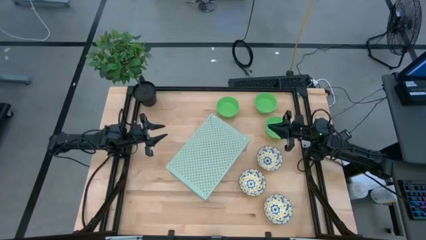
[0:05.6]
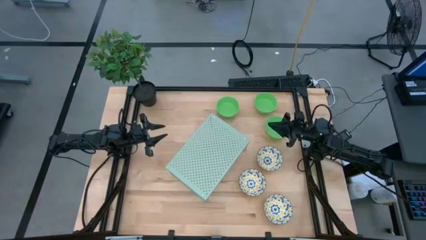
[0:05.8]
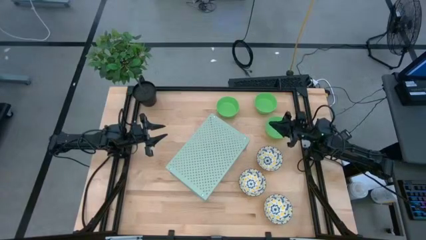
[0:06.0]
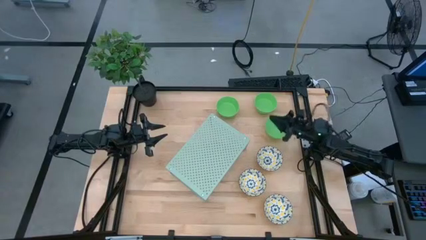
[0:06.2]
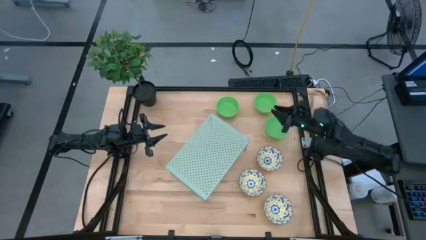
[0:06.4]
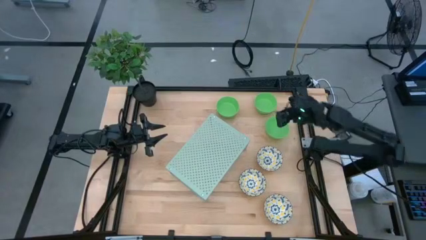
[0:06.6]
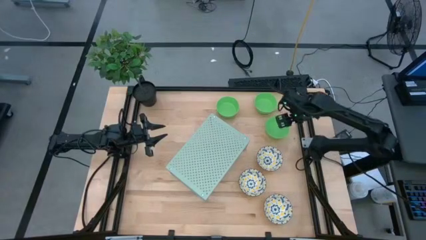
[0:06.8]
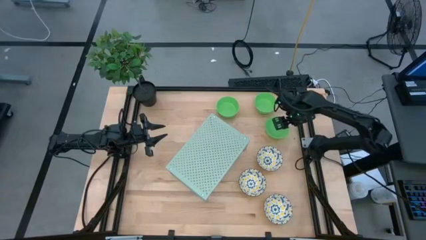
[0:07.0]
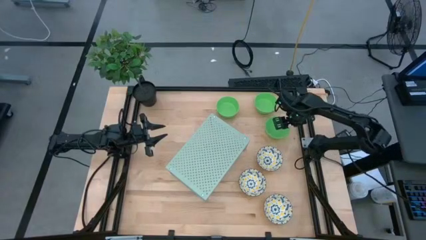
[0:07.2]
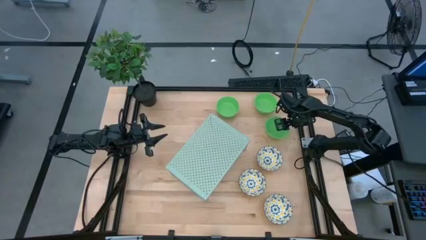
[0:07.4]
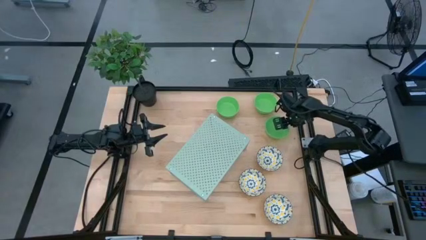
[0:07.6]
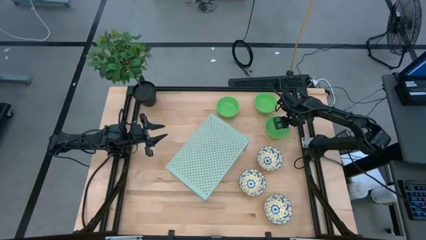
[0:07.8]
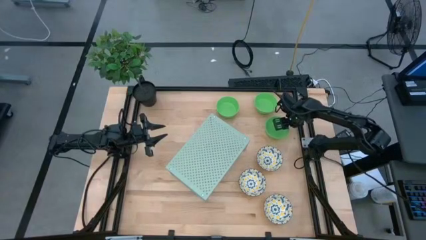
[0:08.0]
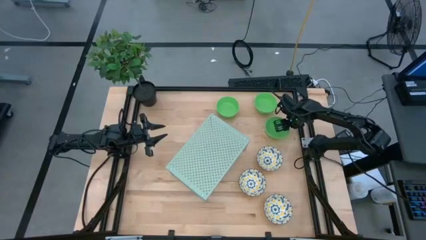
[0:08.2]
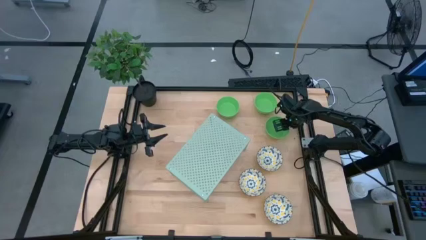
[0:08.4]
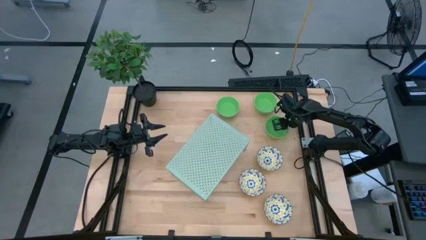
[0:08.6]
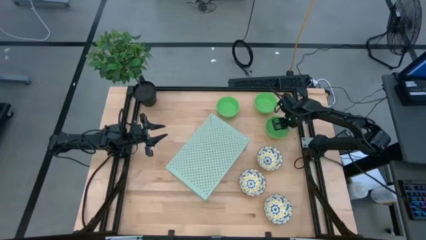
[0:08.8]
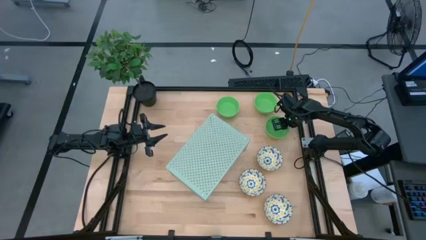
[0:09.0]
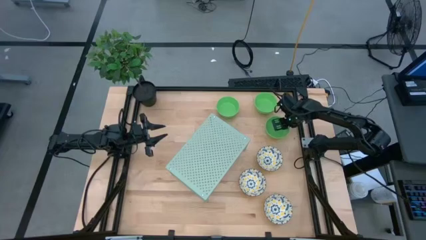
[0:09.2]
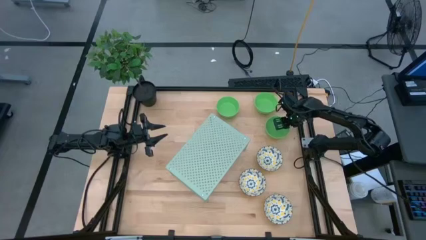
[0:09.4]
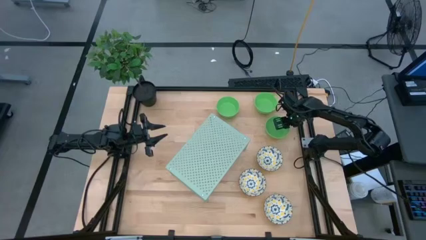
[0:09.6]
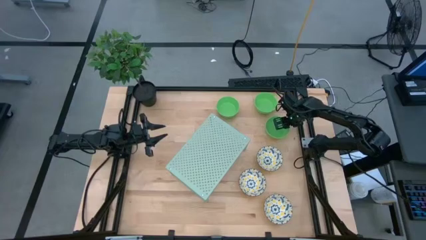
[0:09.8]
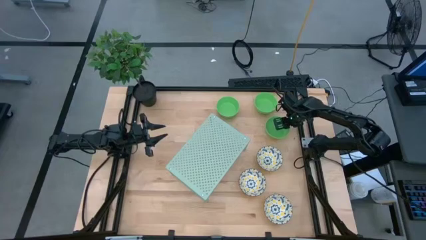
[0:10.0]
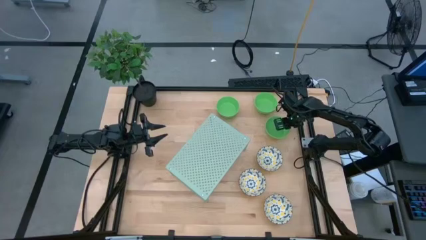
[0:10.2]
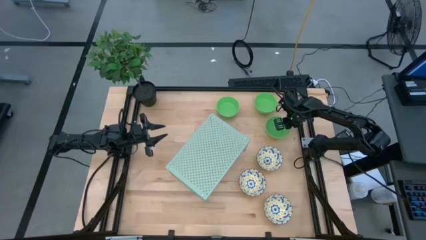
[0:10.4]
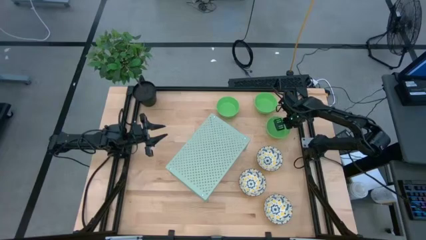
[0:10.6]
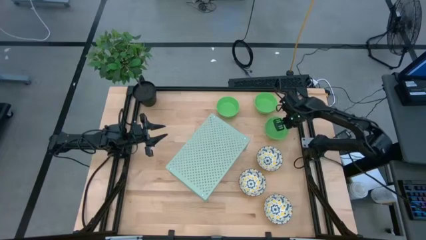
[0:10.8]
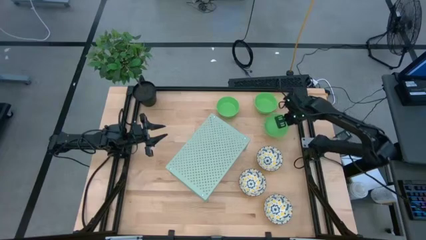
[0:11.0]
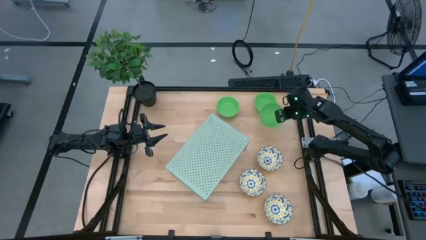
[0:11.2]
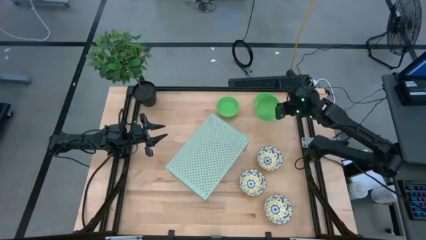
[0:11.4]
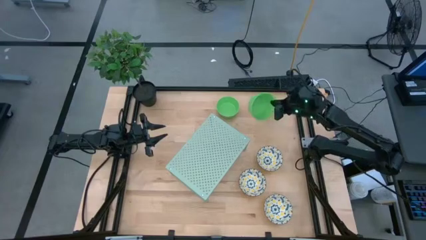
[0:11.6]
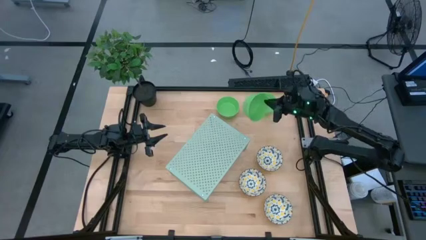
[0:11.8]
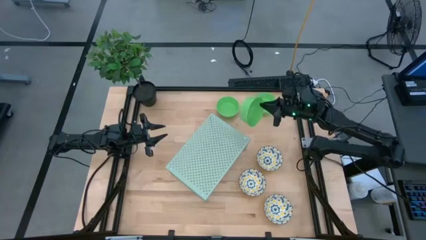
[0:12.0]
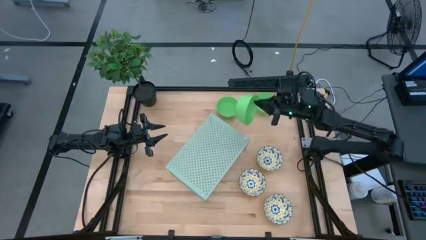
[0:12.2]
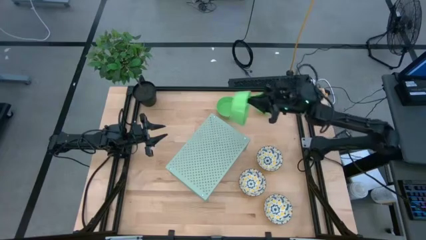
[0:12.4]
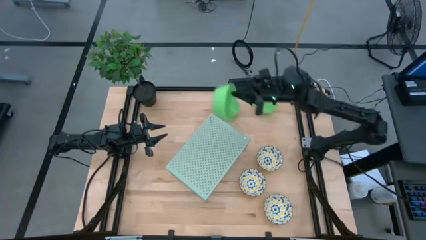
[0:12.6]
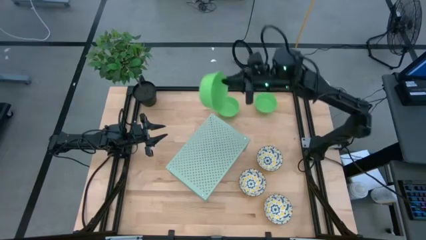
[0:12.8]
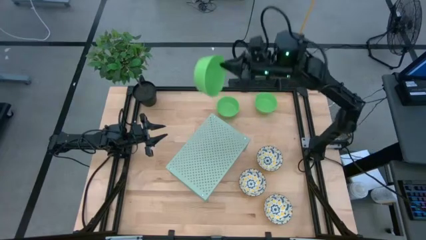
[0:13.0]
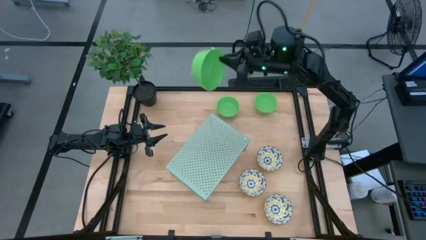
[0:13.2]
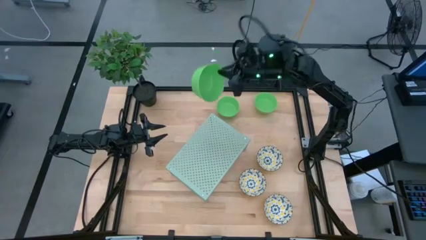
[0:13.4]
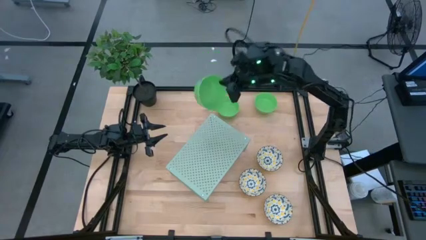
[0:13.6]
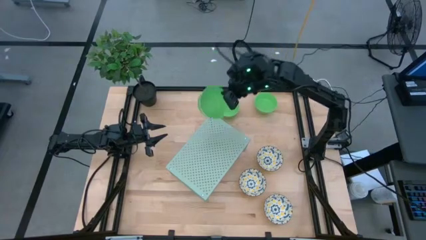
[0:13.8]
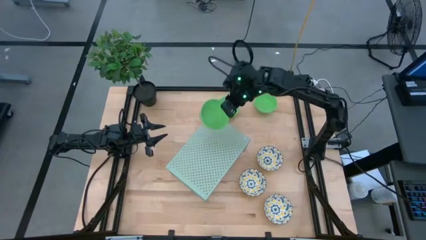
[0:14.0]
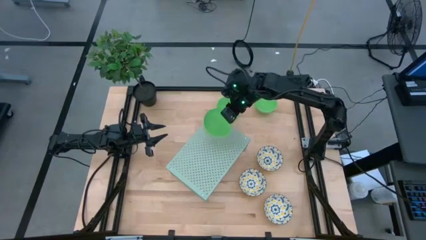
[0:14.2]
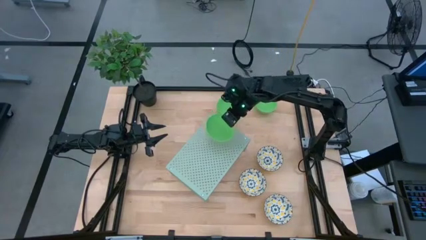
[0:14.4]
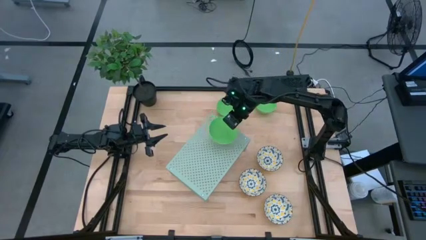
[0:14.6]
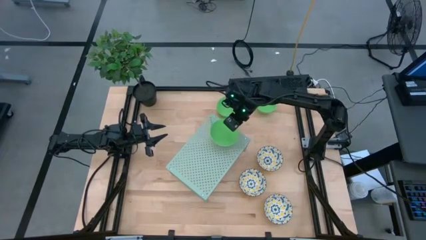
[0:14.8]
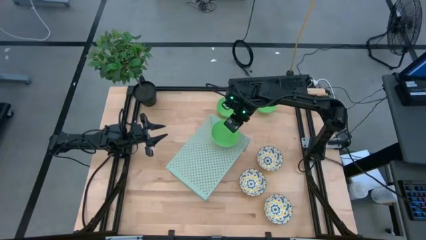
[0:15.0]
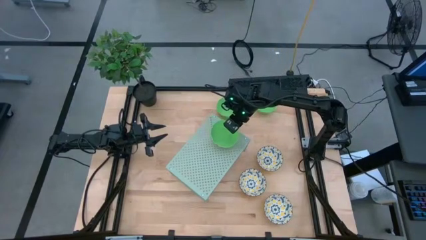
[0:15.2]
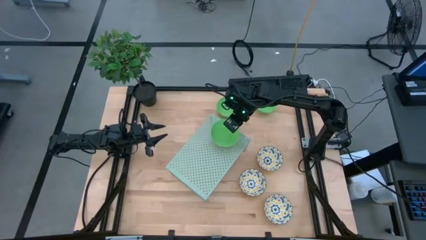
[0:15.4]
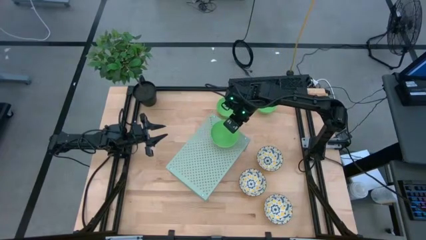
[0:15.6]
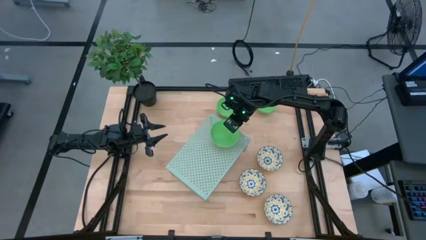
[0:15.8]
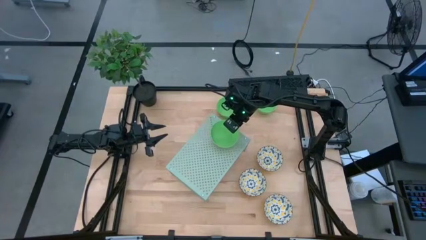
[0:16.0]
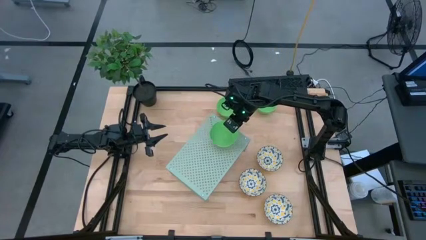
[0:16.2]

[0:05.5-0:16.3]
Task: Pick & Place Mini bowls
Put the bottom green bowl on the shelf
